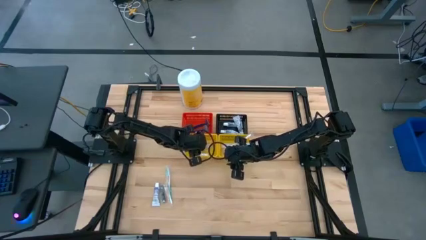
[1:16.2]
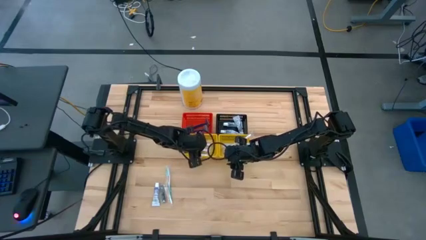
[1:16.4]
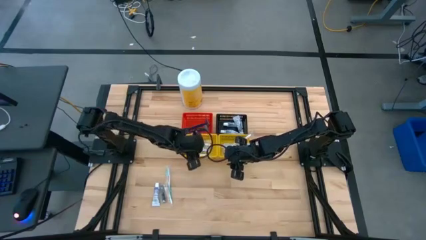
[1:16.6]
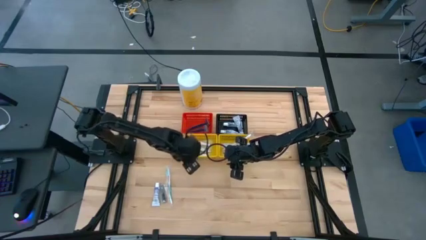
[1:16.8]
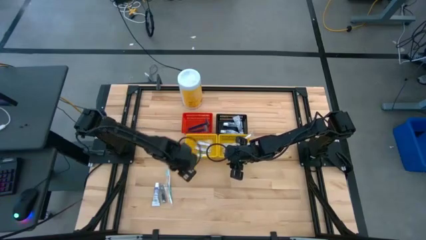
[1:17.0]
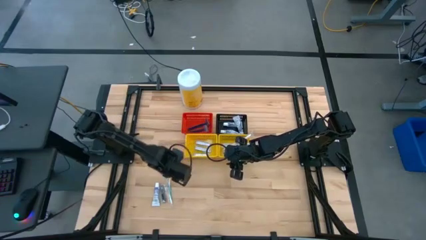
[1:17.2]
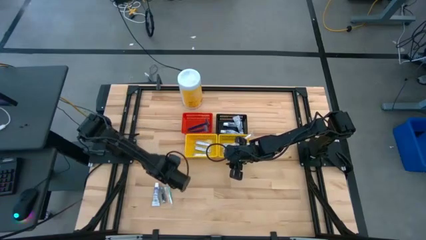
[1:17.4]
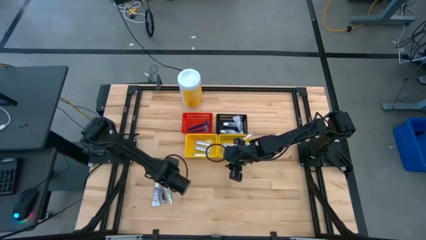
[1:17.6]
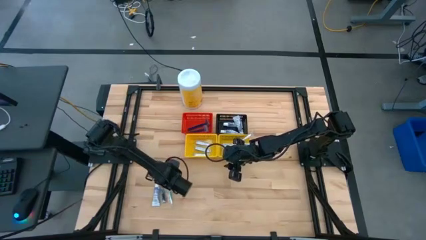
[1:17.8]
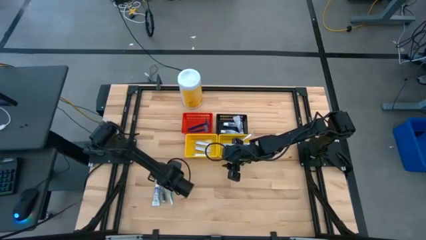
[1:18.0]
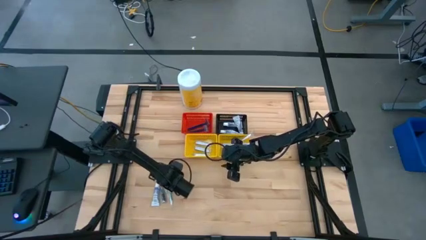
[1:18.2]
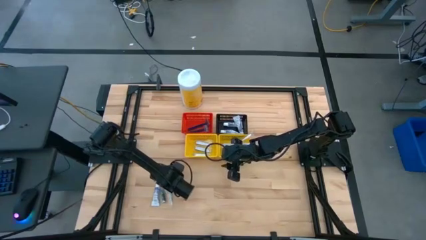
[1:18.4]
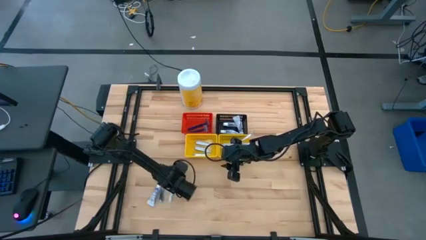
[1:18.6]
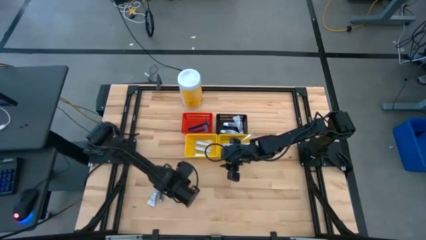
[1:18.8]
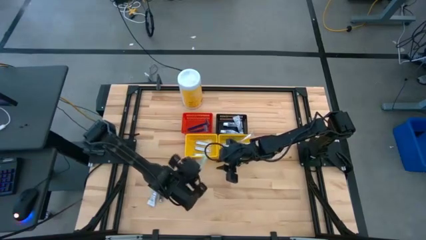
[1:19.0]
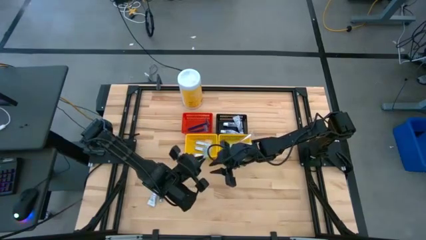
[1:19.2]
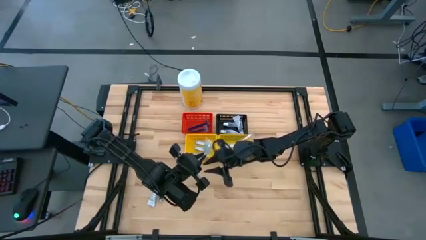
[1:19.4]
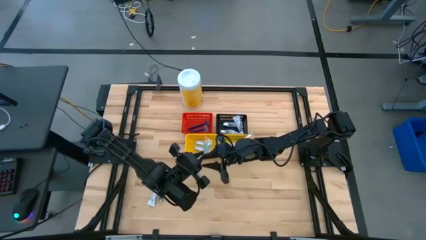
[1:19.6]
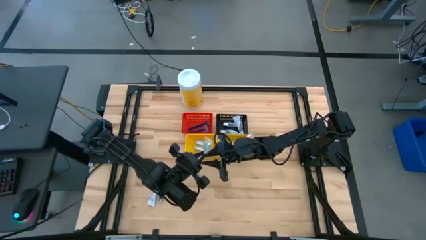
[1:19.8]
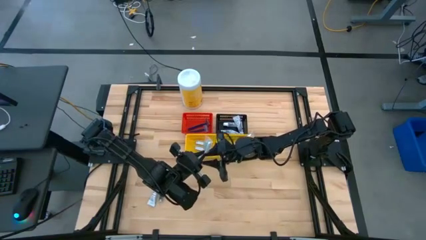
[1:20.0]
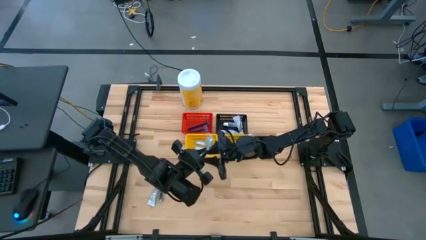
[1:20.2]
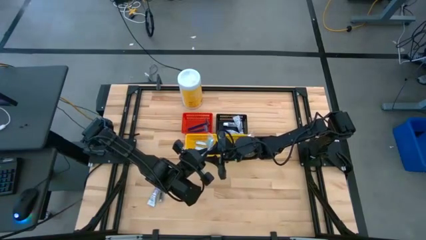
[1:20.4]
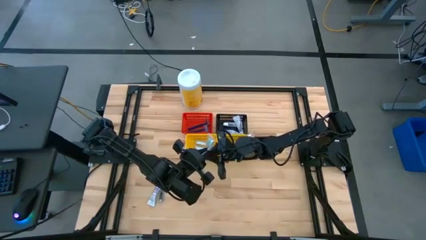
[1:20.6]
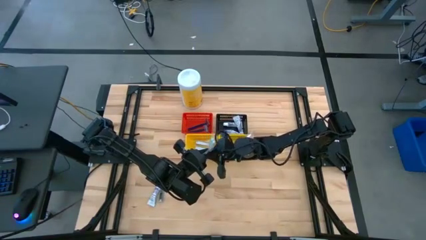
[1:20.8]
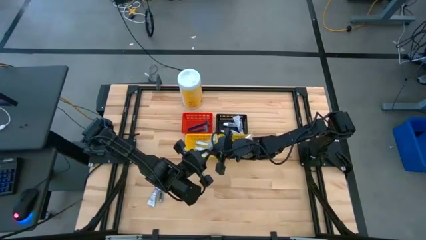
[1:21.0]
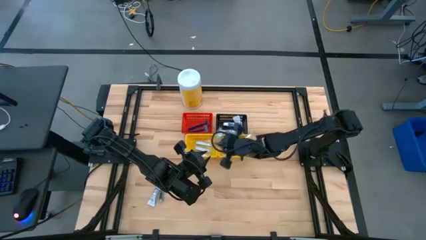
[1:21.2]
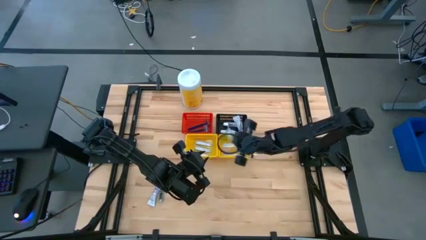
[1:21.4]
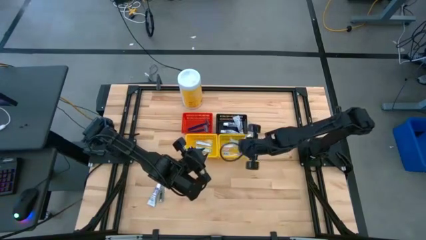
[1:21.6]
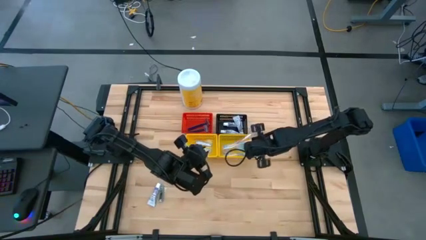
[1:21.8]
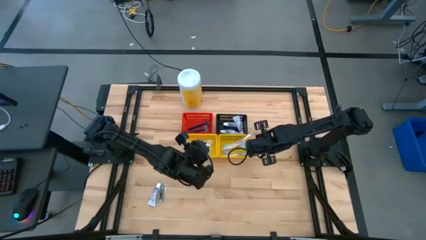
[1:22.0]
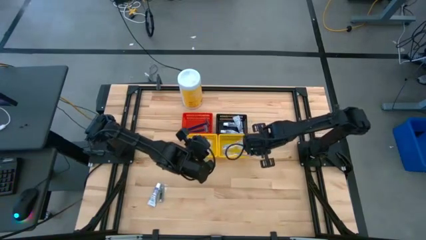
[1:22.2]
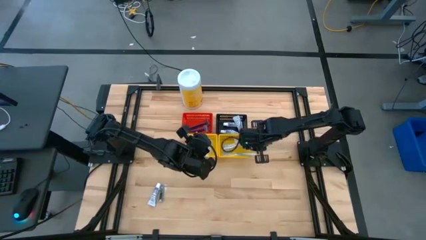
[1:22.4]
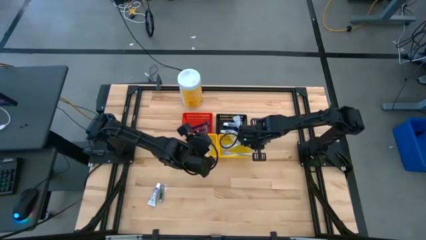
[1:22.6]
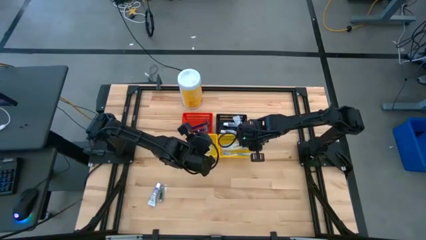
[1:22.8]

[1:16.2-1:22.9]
Task: Pick & Place Travel size toiletries
Put the green toothbrush into the right yellow bin

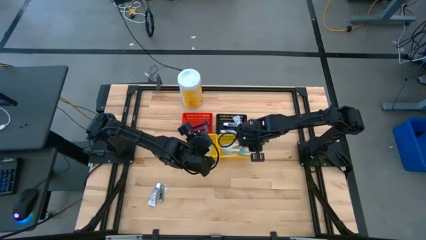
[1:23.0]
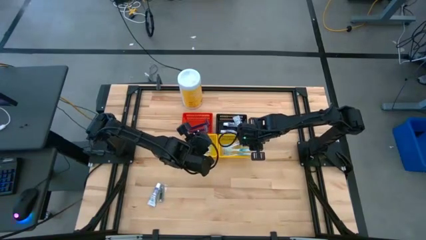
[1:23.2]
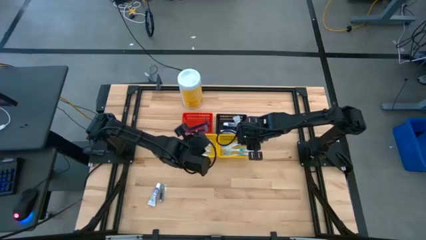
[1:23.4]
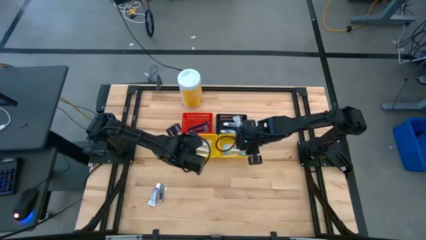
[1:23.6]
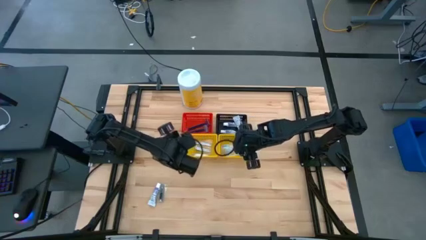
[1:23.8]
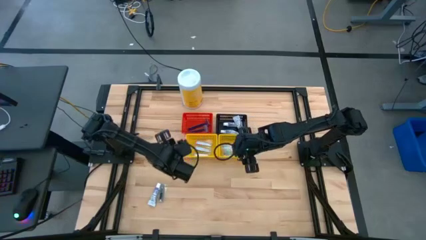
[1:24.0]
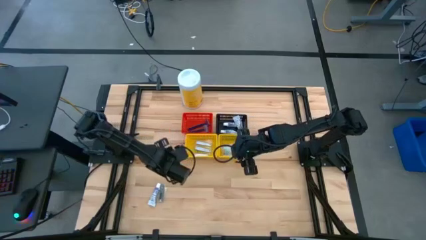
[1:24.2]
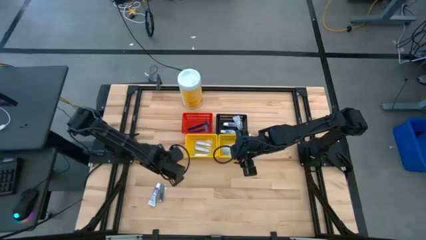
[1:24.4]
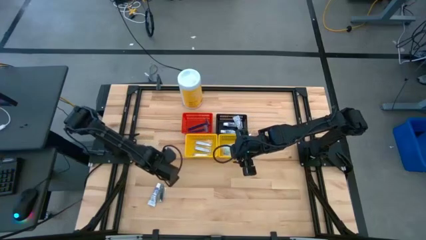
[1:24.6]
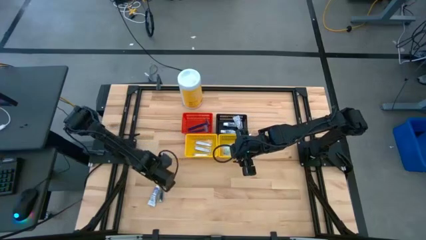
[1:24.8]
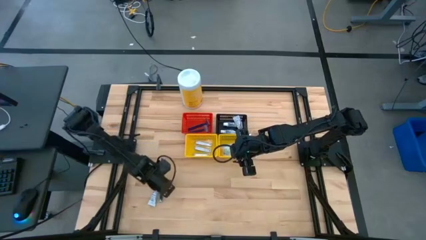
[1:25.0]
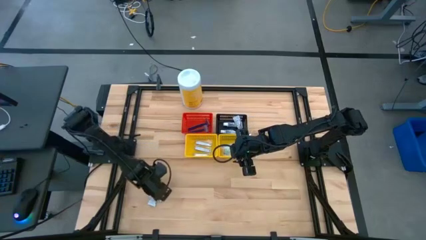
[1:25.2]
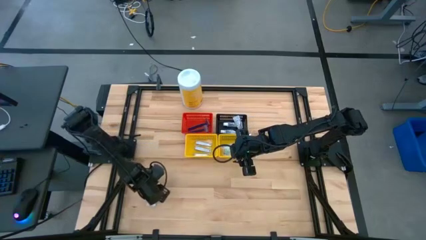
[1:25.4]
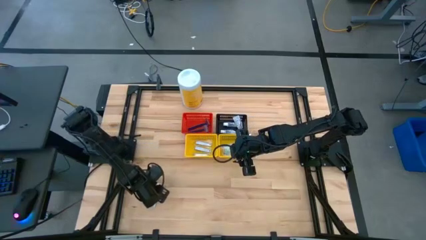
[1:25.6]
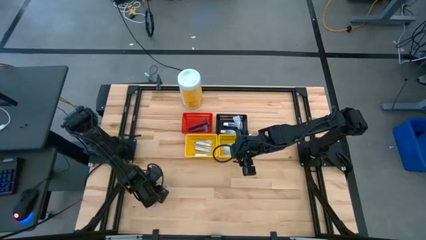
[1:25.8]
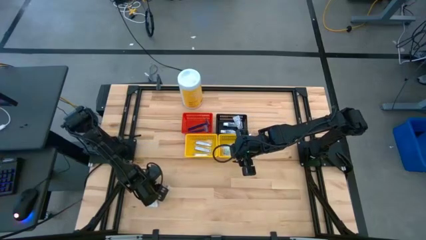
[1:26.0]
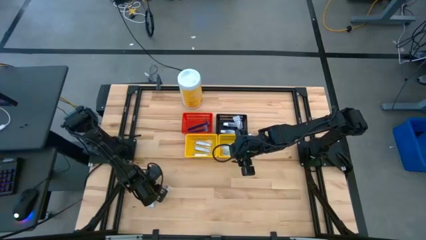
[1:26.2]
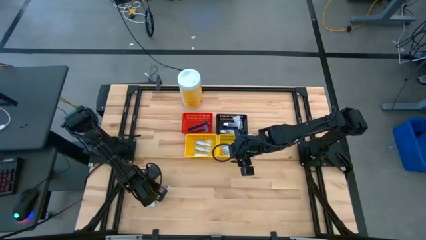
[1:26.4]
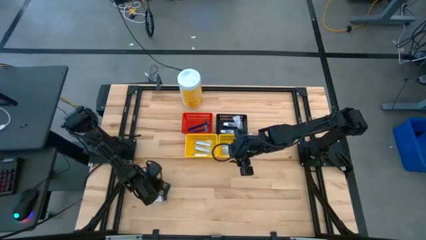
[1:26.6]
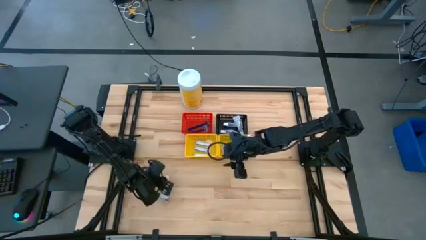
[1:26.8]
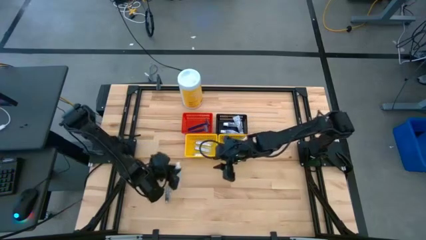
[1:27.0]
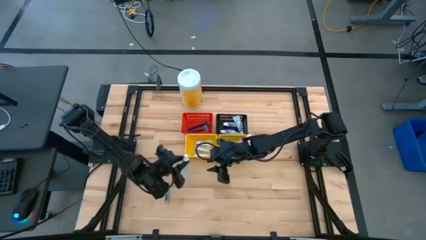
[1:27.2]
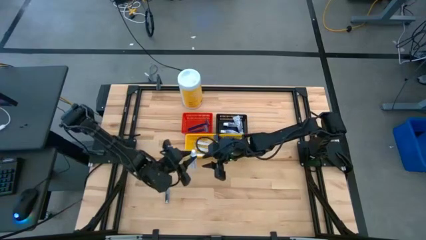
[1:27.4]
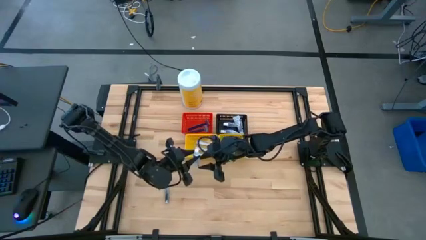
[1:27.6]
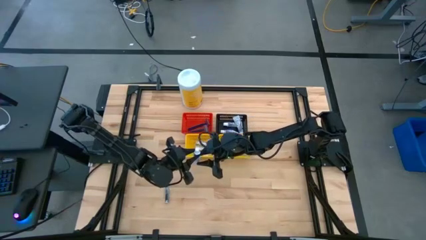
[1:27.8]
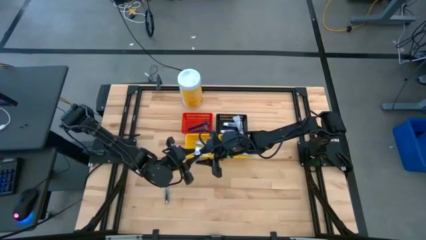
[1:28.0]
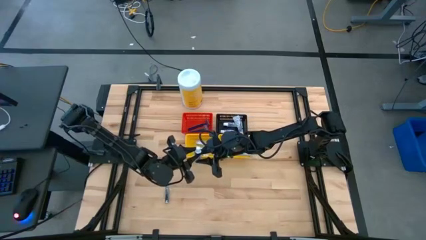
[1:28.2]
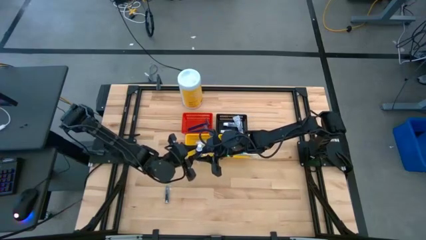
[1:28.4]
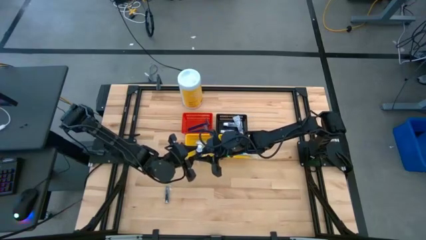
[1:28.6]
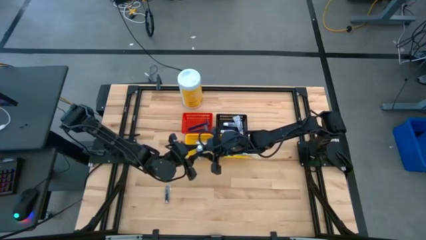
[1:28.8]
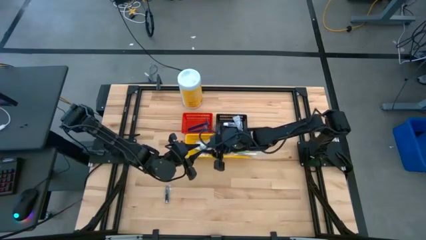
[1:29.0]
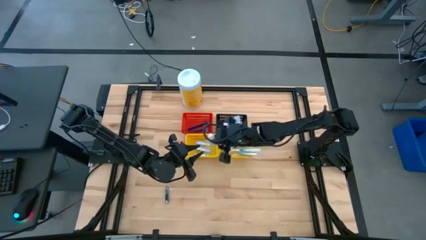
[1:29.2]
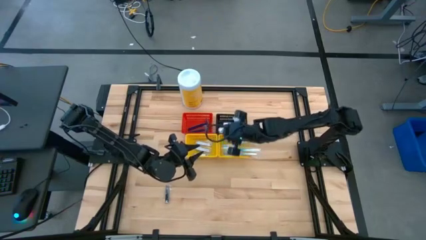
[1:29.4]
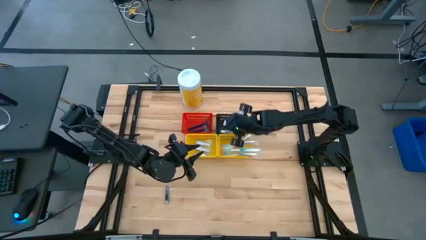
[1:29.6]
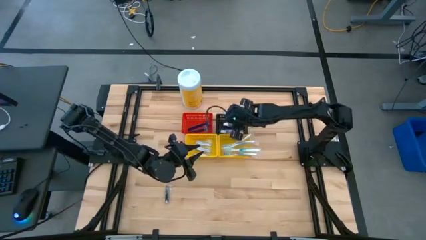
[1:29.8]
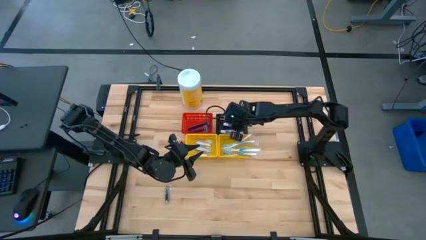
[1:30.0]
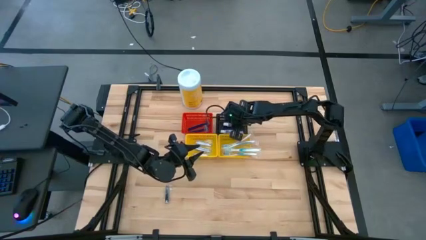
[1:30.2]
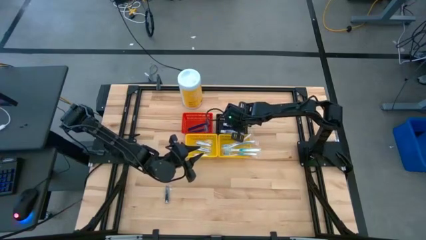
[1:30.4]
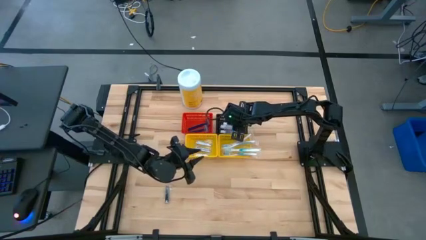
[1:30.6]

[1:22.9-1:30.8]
Put the white toothpaste into the black bin

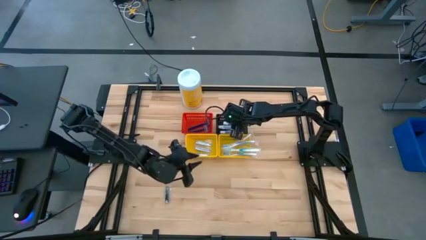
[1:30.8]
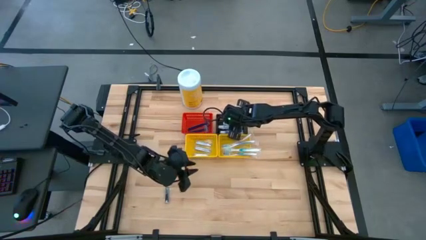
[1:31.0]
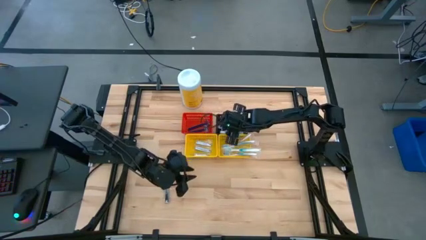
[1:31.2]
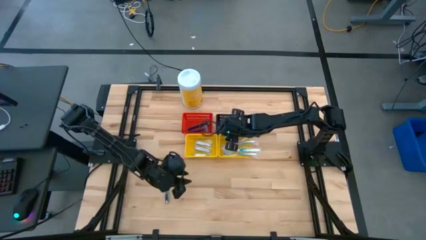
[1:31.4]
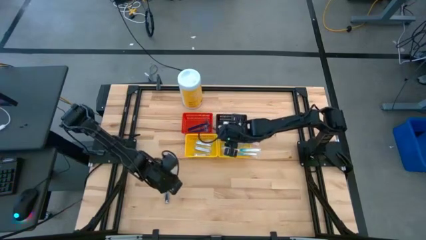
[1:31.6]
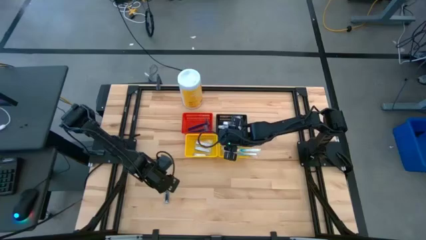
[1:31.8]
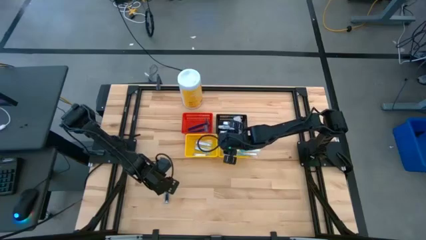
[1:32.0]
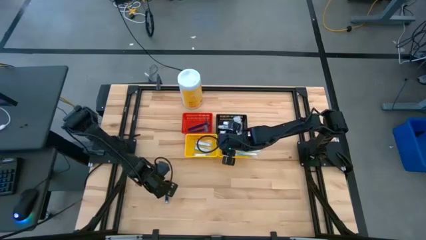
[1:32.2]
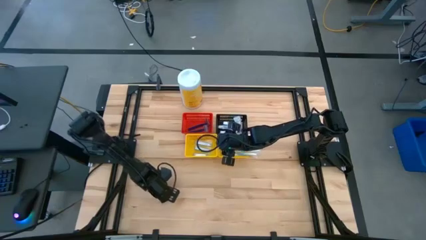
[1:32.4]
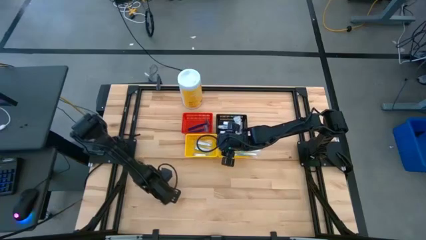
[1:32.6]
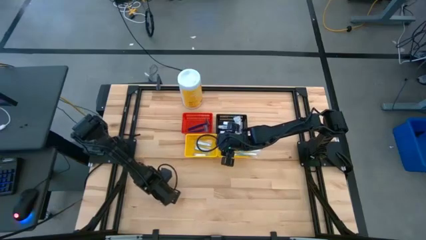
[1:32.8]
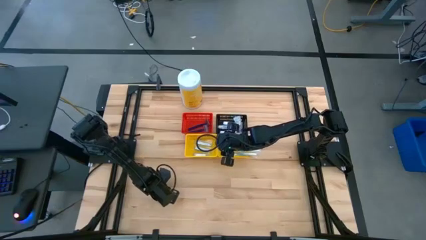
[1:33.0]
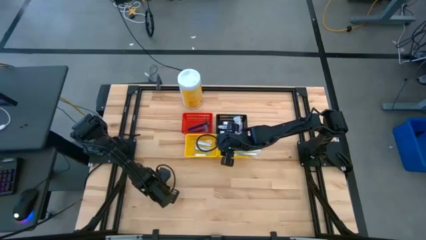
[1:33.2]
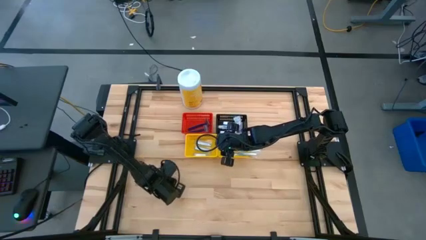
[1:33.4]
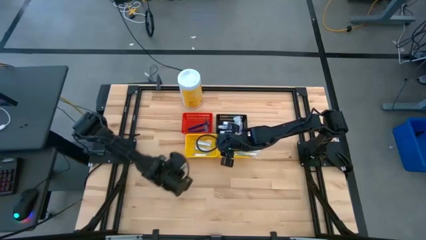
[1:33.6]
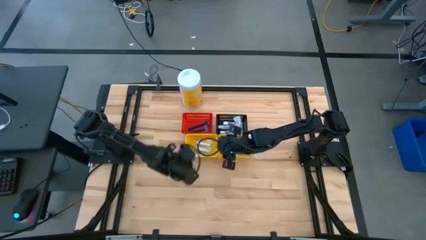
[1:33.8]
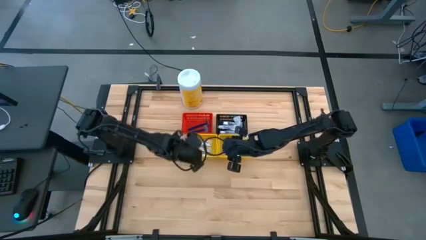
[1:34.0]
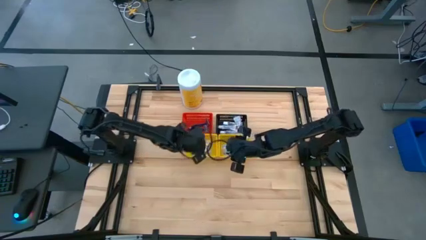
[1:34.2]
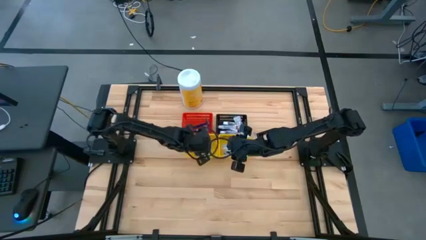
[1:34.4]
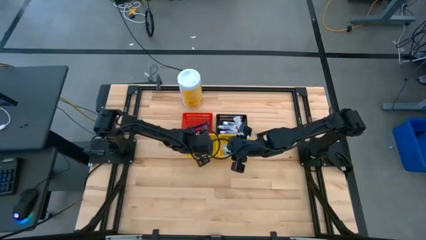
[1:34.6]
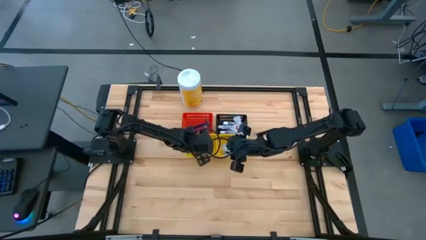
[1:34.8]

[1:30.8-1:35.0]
Put the silver nail cutter into the left yellow bin
